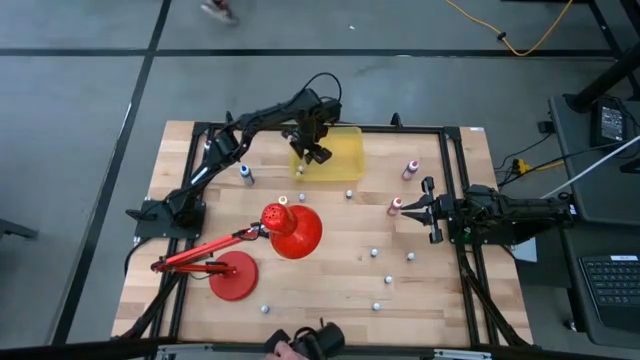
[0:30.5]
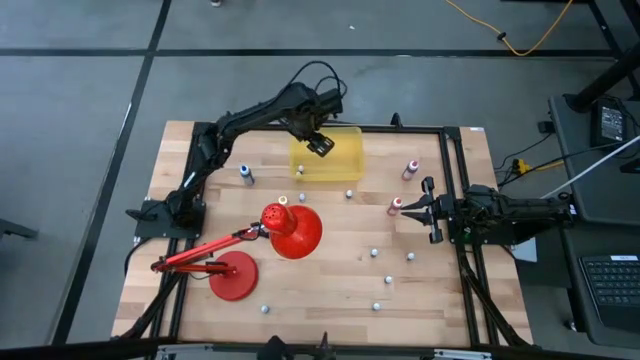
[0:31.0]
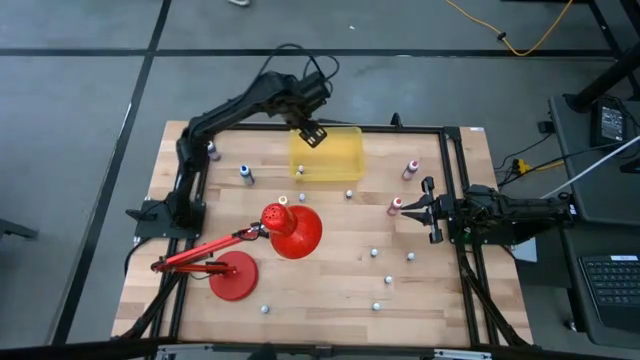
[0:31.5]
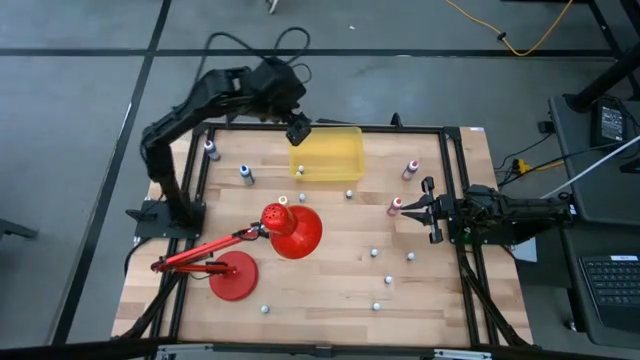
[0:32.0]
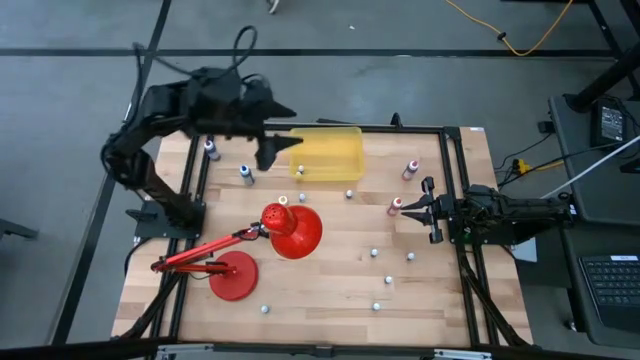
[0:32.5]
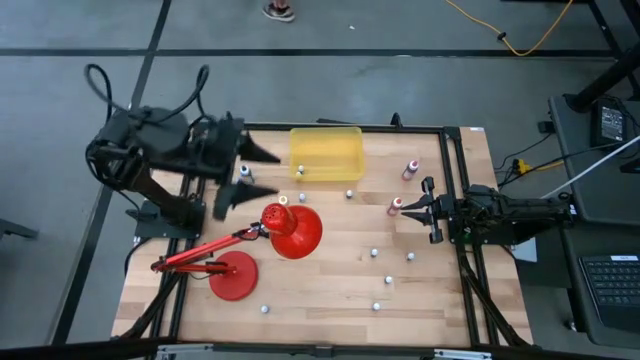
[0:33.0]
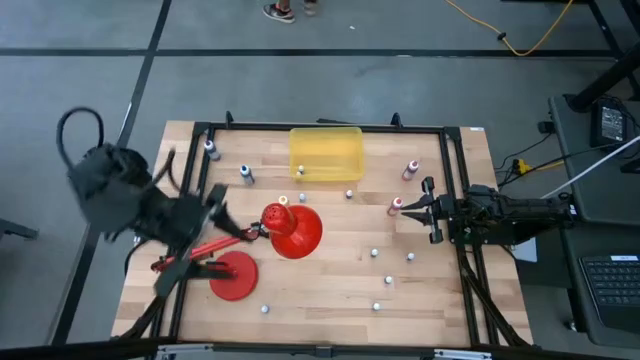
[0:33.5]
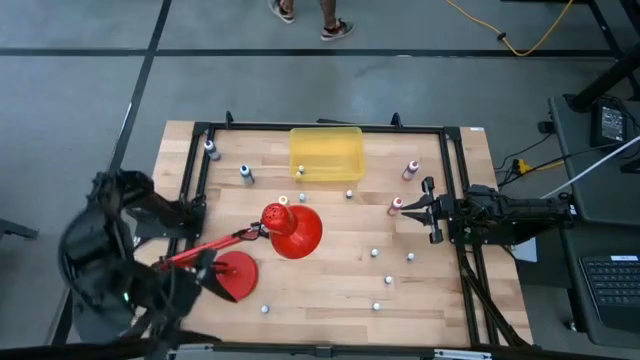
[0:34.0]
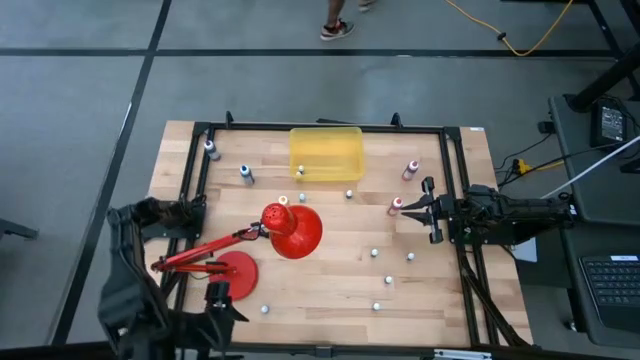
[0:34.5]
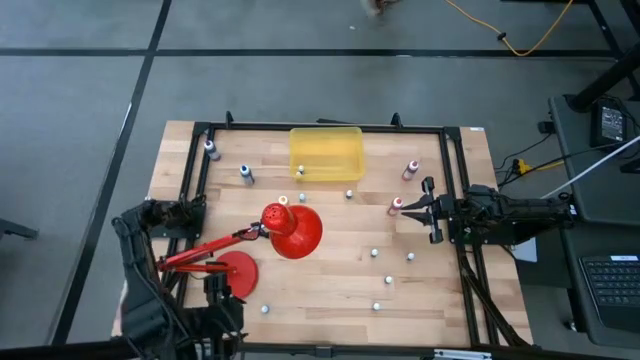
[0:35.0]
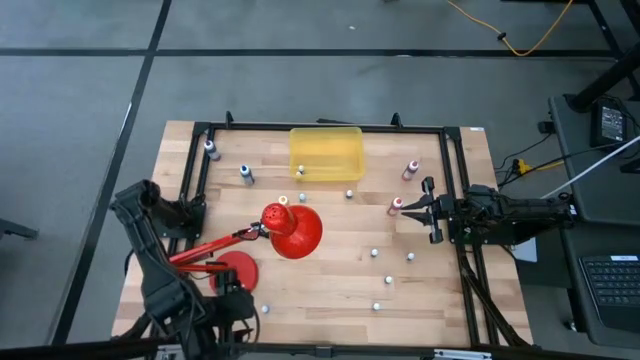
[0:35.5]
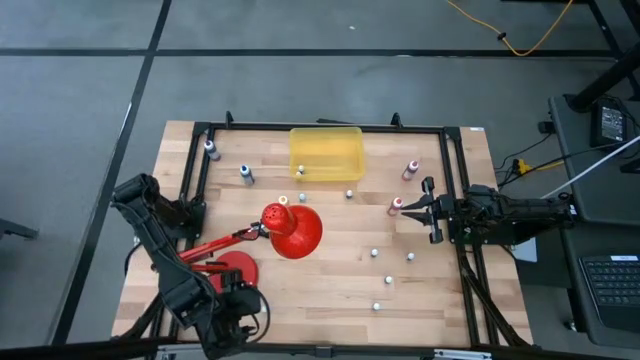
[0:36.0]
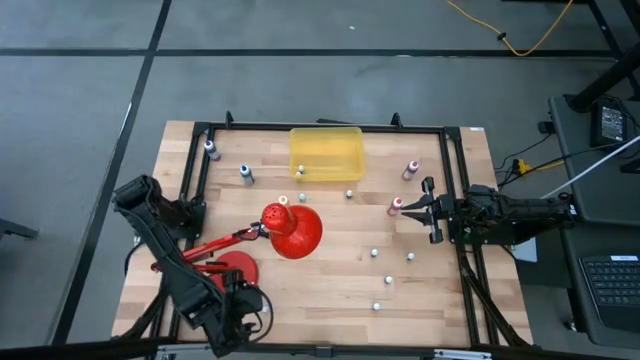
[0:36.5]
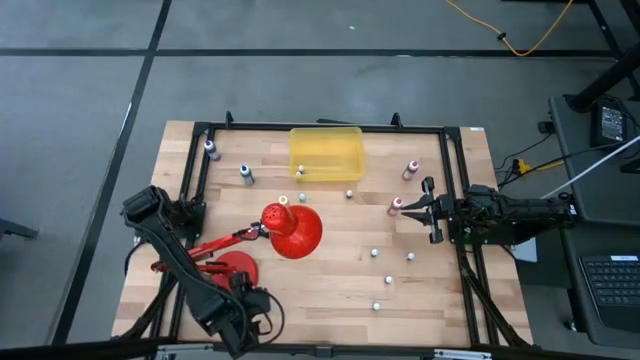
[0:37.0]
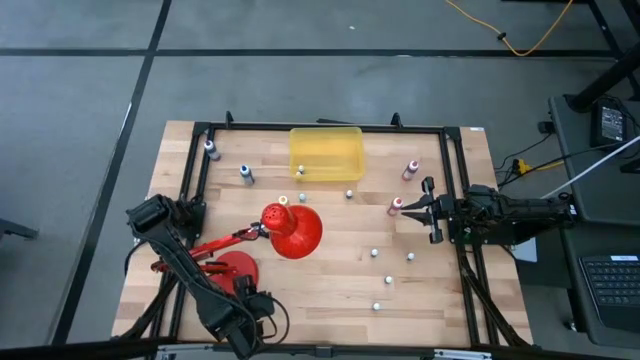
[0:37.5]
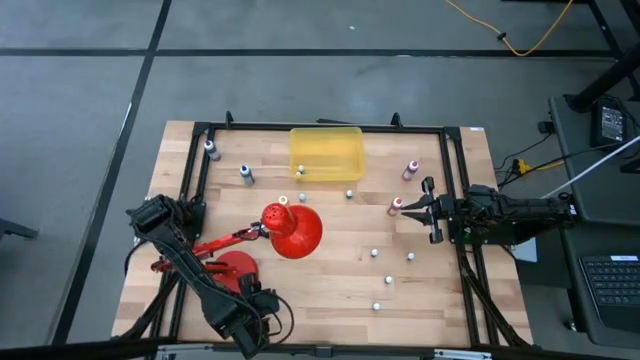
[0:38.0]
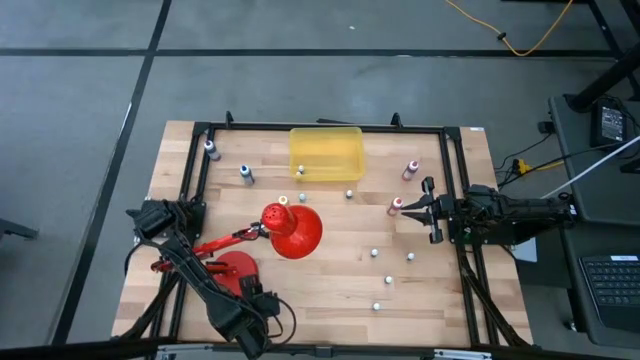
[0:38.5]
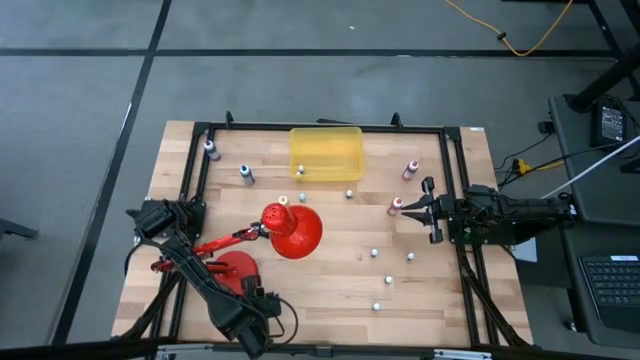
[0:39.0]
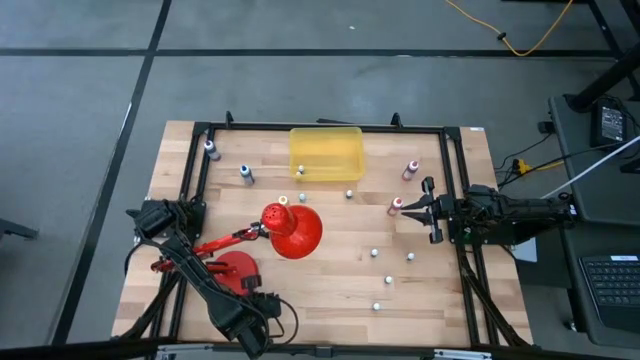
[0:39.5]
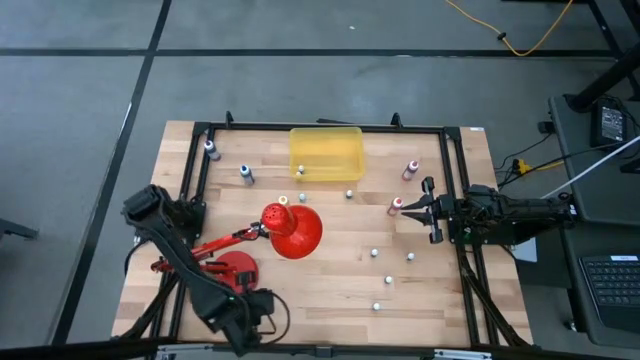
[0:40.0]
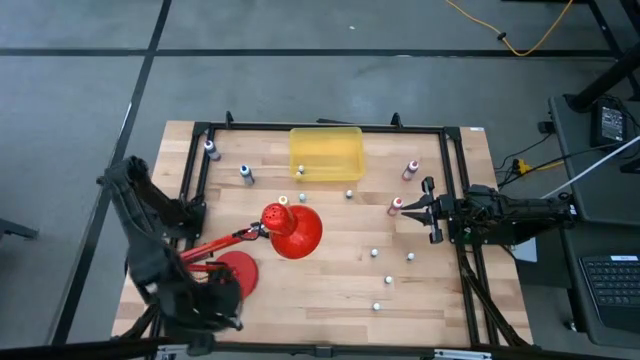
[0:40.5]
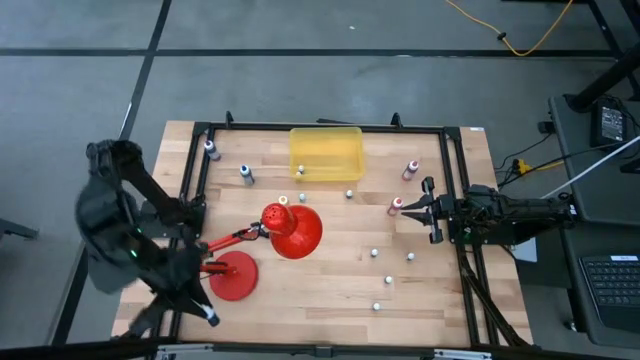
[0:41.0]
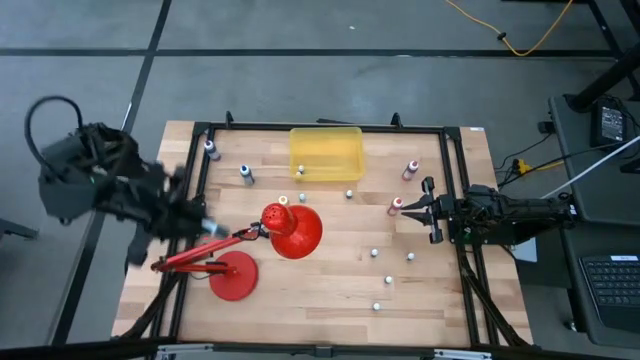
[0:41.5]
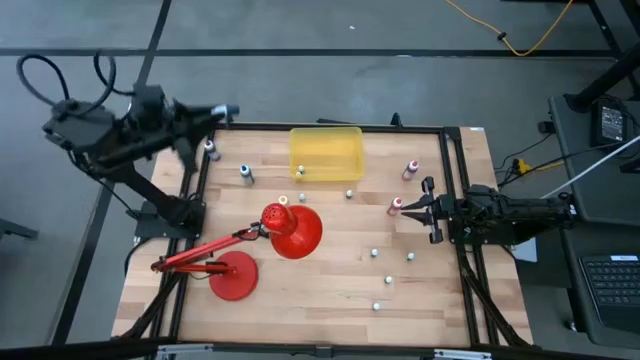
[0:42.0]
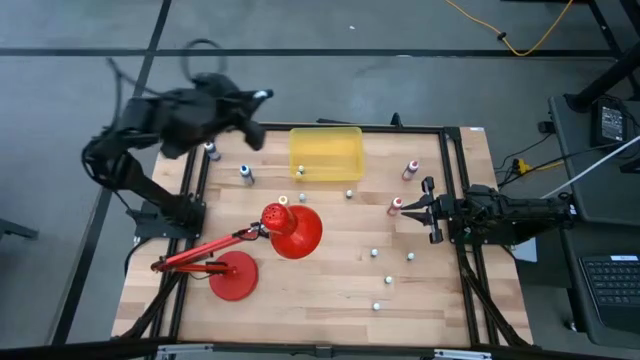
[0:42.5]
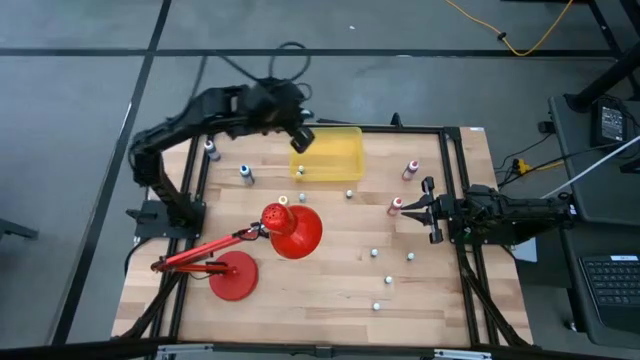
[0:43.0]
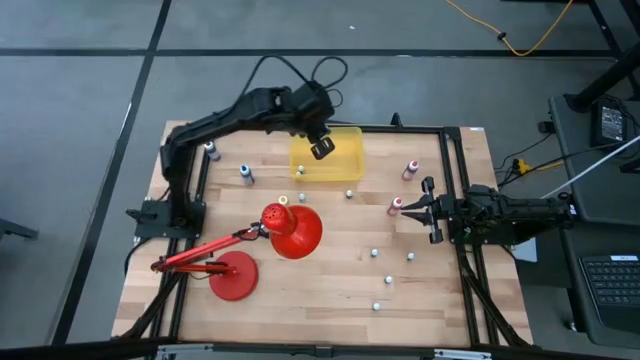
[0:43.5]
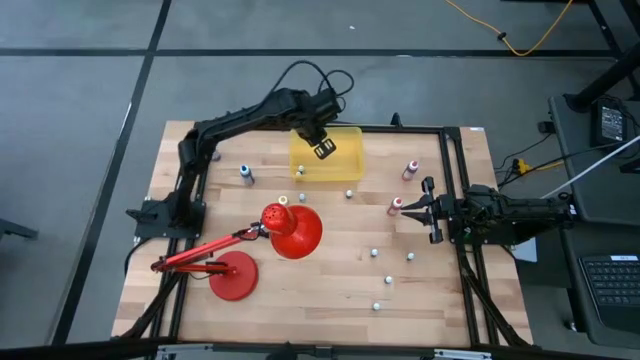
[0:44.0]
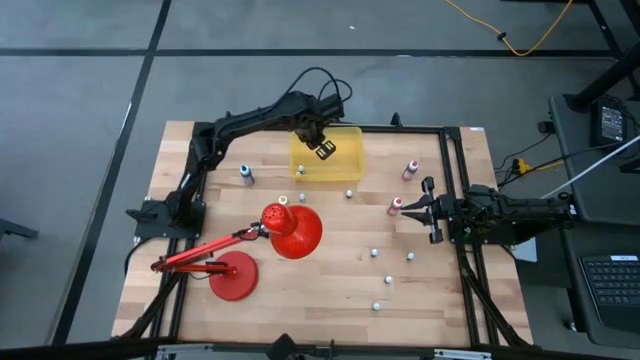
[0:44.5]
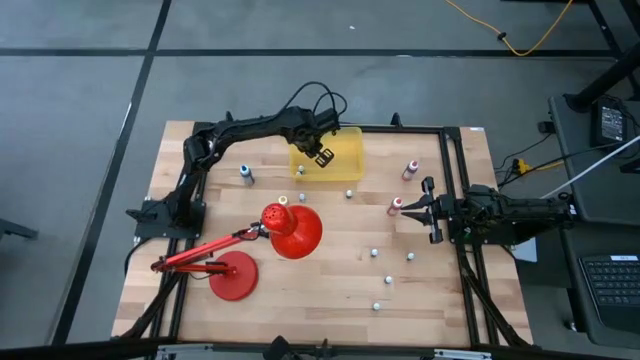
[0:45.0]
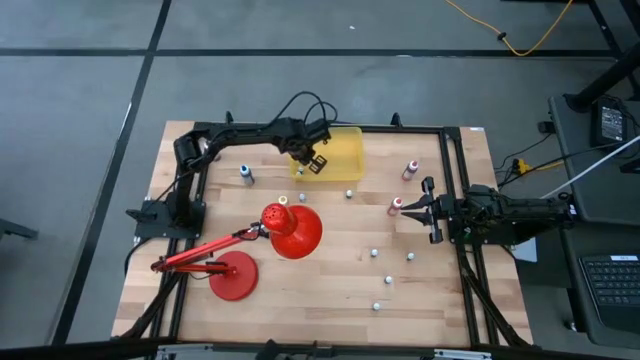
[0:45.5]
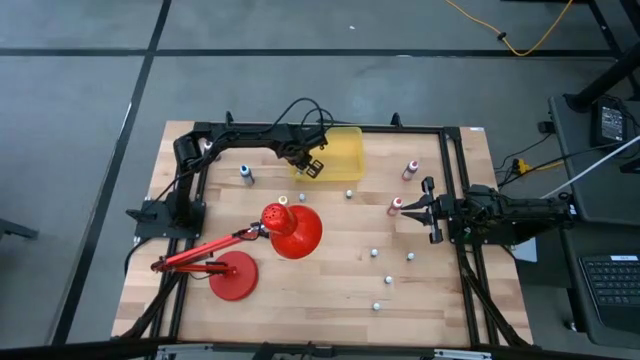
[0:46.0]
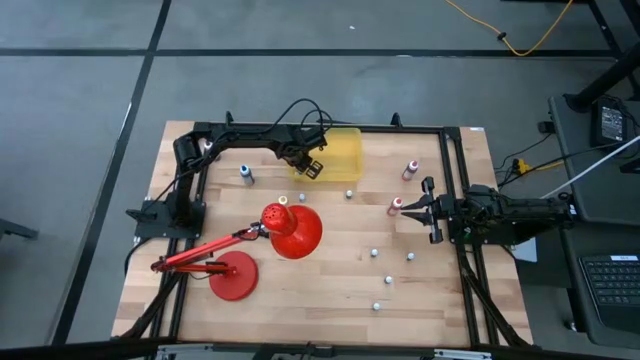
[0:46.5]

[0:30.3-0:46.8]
Task: Pick & Place food coloring
Put the blue food coloring bottle into the yellow bin

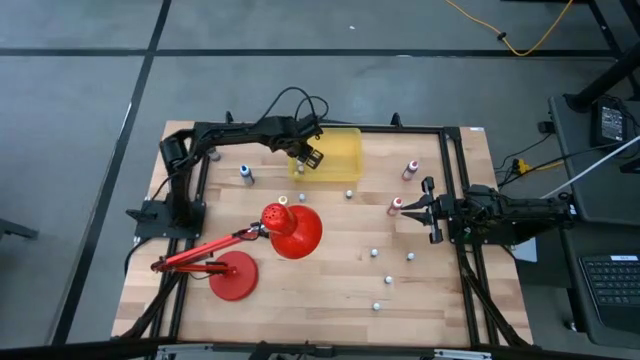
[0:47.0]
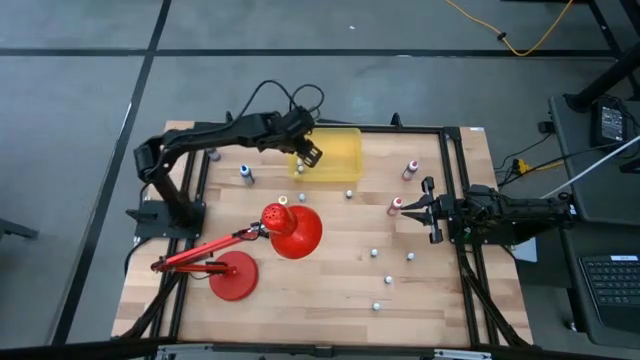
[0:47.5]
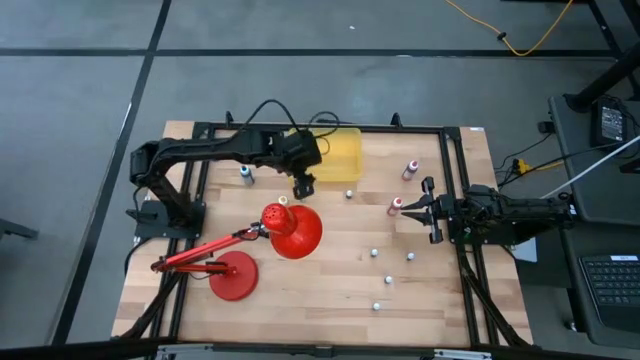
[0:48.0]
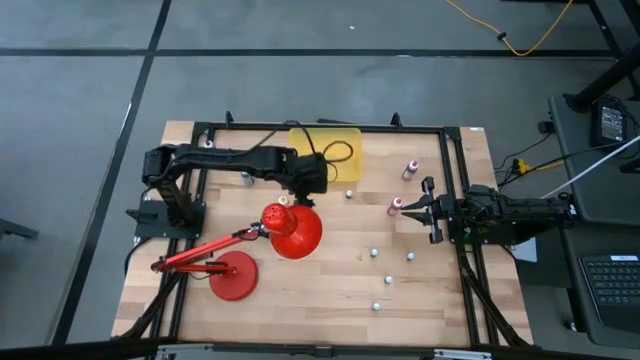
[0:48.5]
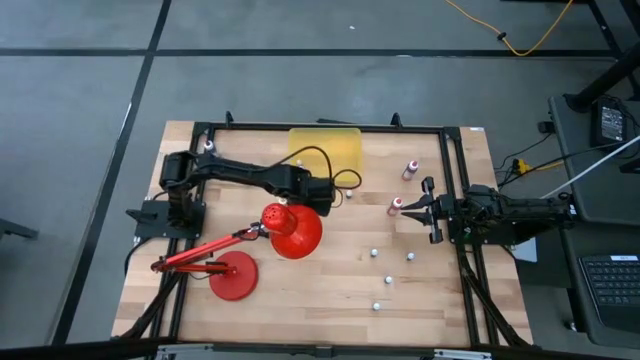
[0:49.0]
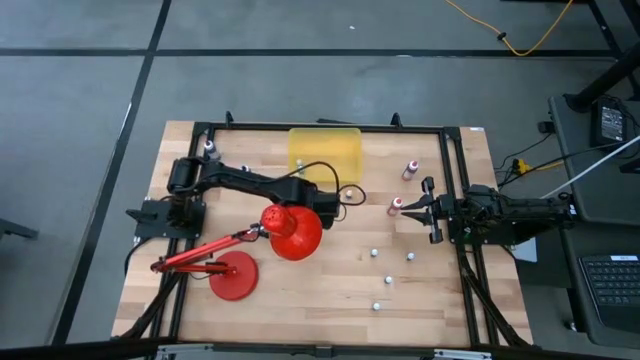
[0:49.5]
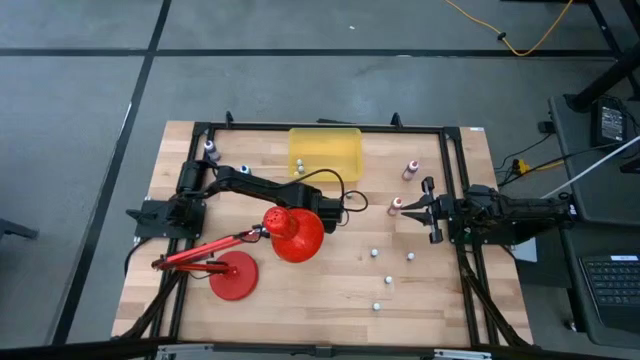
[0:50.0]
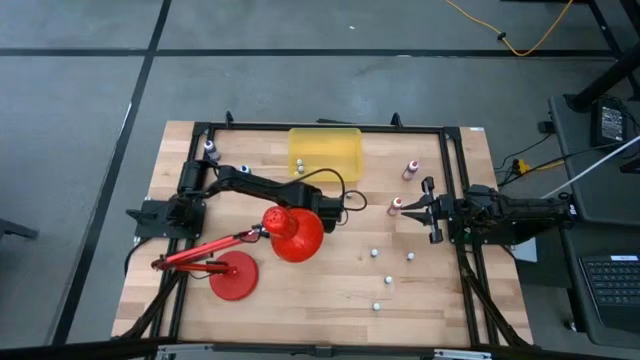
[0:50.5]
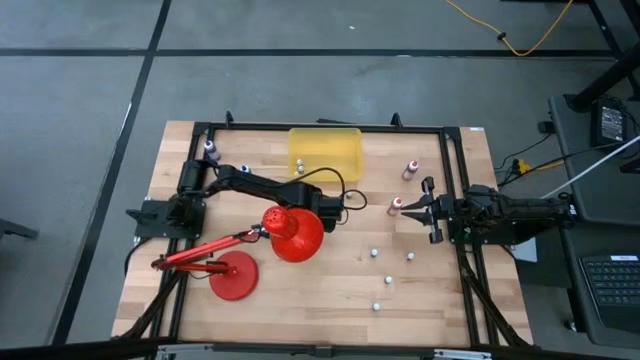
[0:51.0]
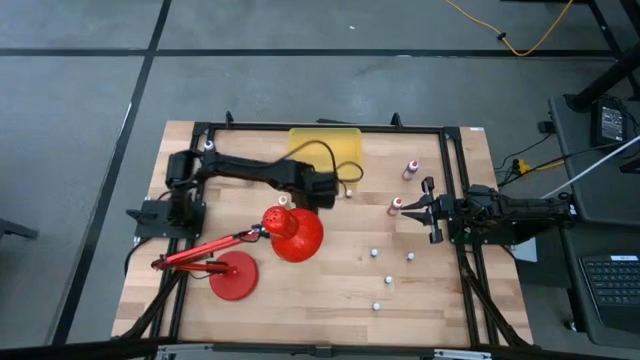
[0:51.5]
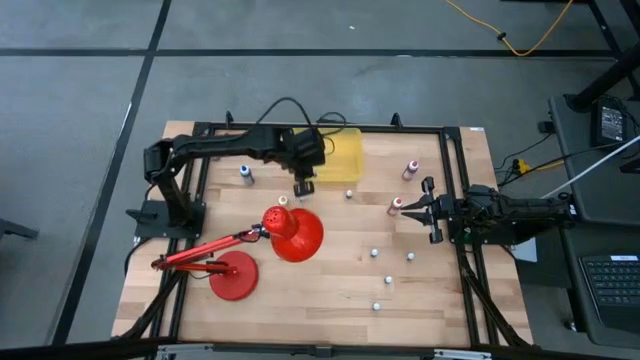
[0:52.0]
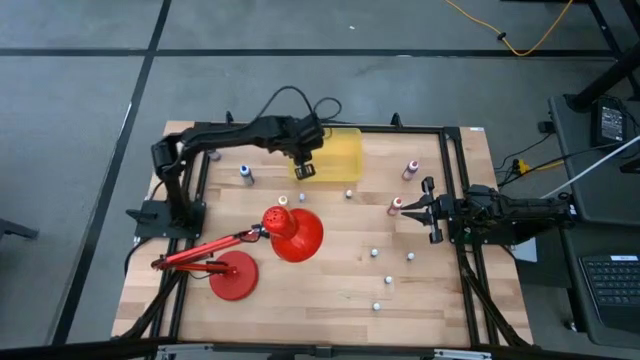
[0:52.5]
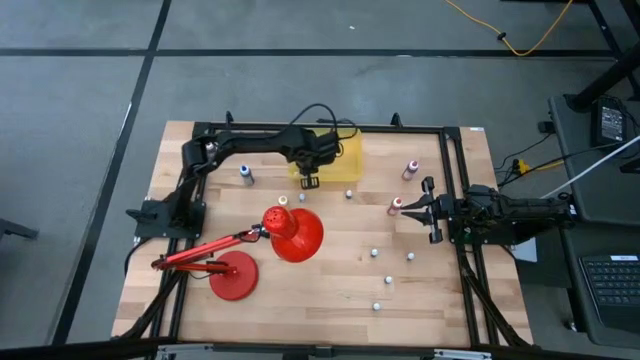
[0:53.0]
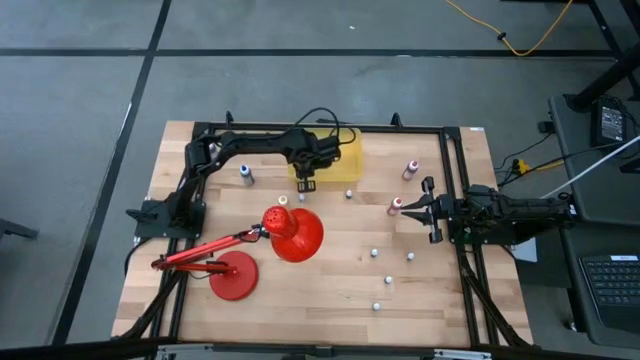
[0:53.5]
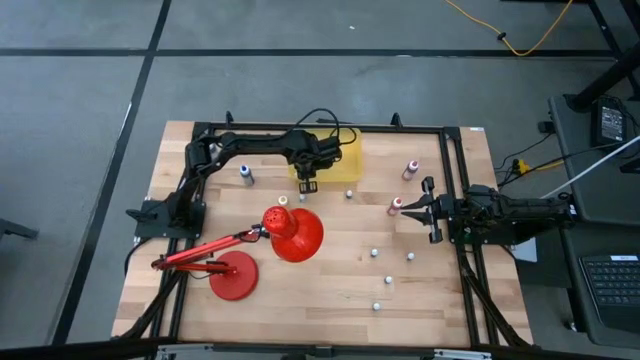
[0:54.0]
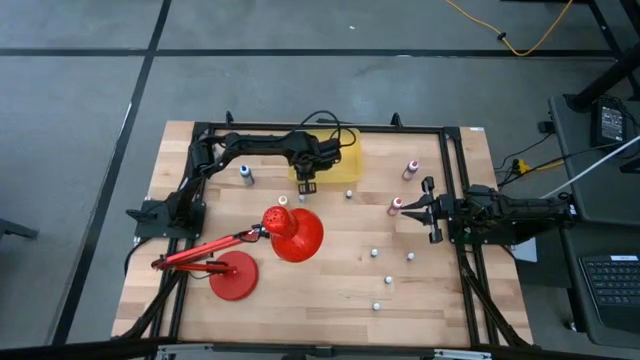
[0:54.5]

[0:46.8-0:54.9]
Put the green food coloring bottle into the yellow bin
